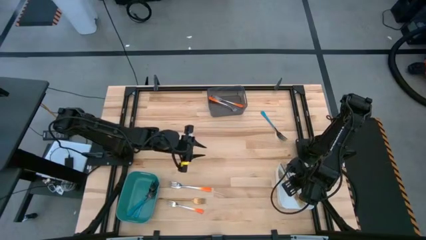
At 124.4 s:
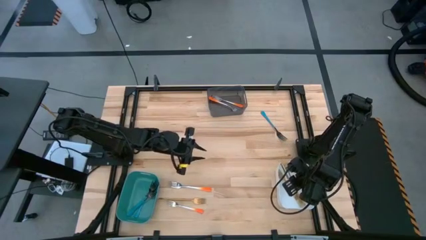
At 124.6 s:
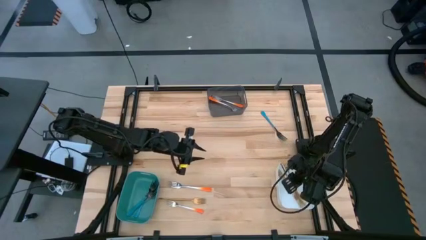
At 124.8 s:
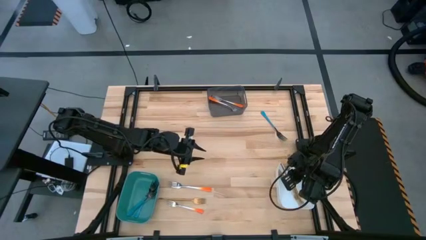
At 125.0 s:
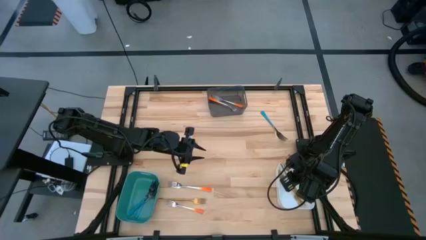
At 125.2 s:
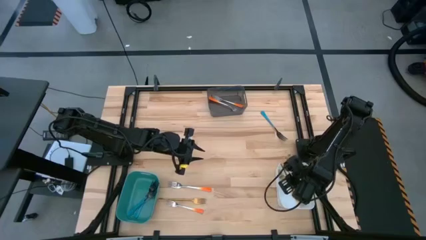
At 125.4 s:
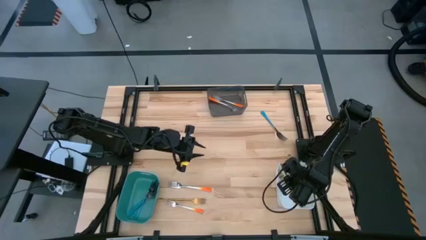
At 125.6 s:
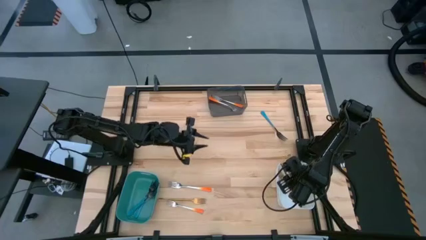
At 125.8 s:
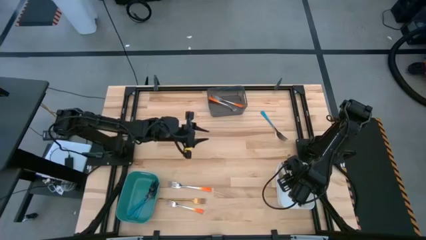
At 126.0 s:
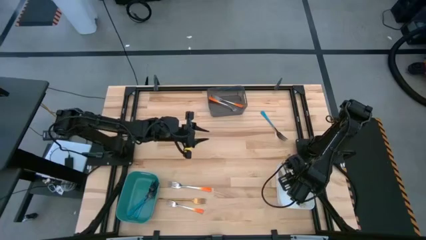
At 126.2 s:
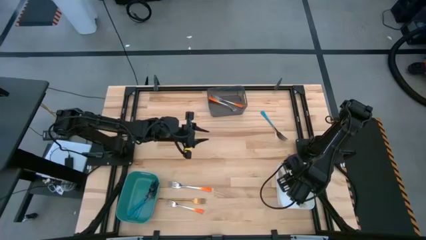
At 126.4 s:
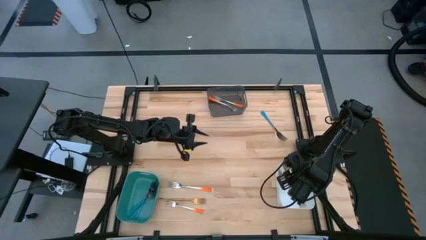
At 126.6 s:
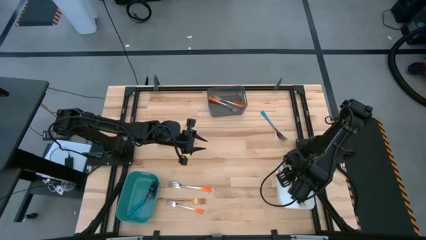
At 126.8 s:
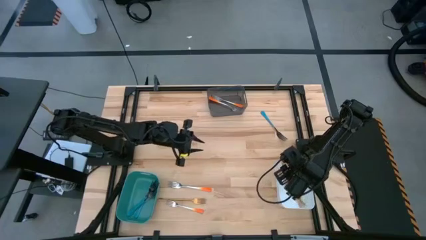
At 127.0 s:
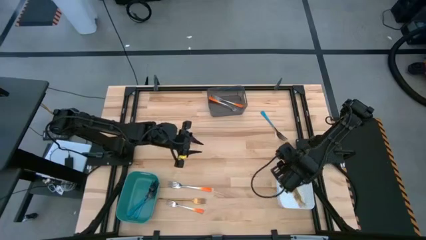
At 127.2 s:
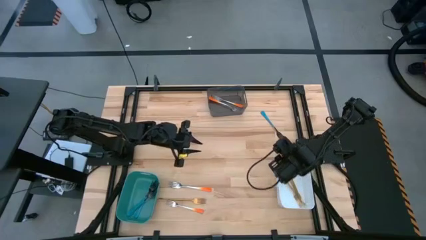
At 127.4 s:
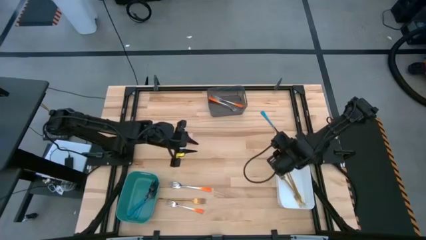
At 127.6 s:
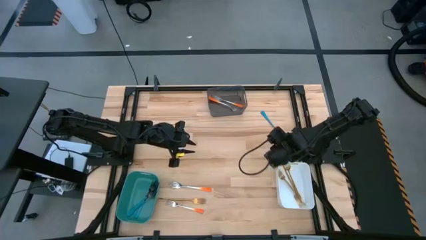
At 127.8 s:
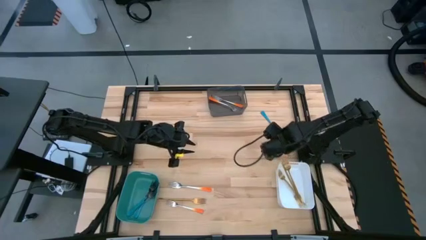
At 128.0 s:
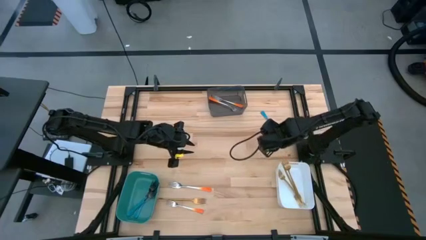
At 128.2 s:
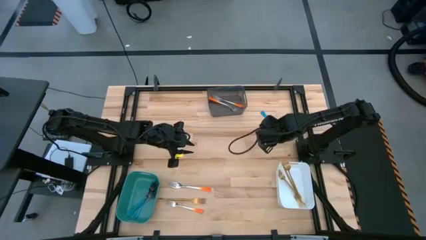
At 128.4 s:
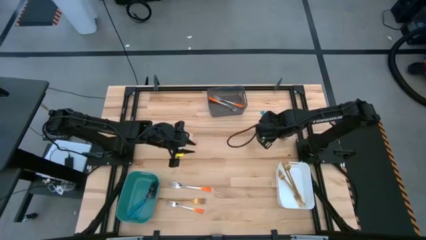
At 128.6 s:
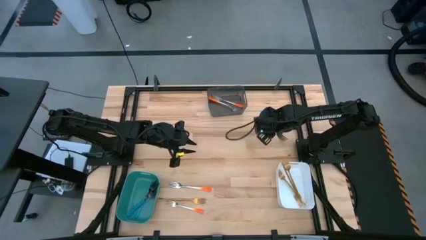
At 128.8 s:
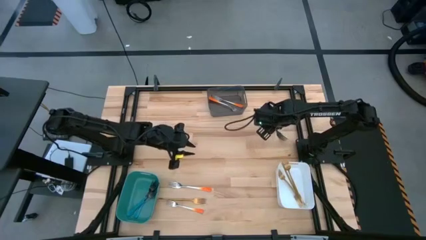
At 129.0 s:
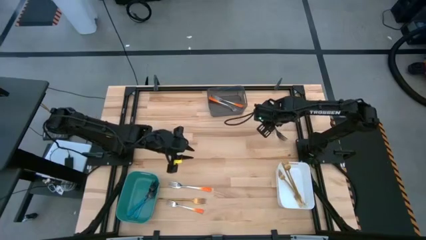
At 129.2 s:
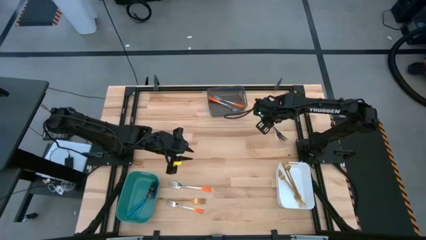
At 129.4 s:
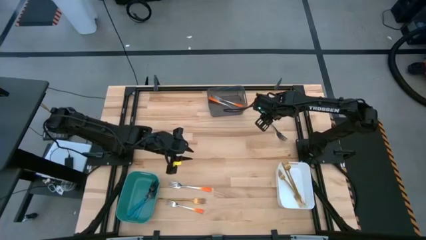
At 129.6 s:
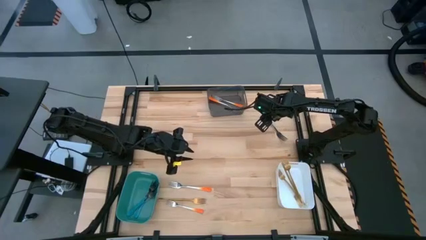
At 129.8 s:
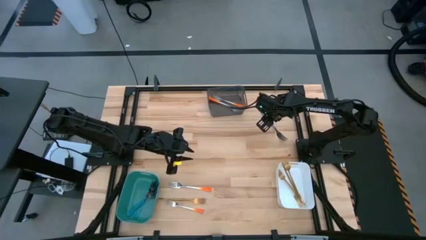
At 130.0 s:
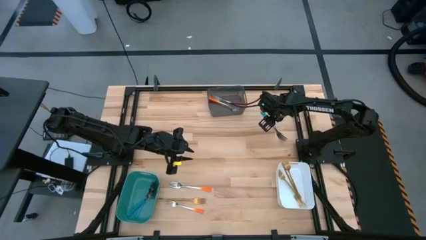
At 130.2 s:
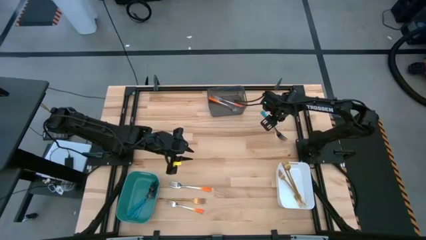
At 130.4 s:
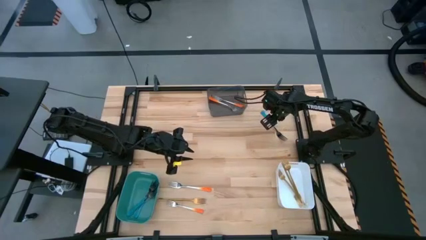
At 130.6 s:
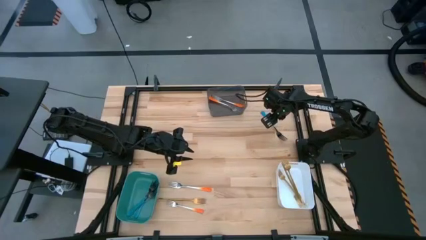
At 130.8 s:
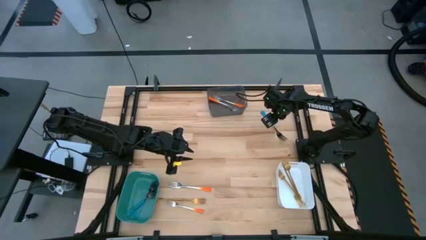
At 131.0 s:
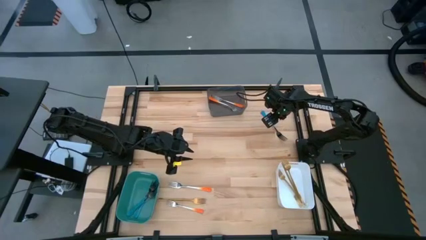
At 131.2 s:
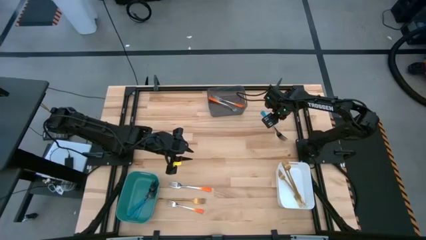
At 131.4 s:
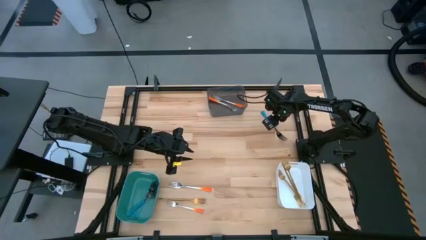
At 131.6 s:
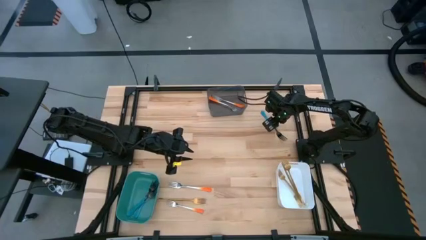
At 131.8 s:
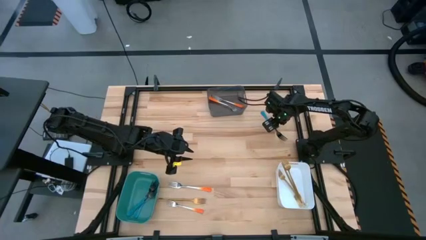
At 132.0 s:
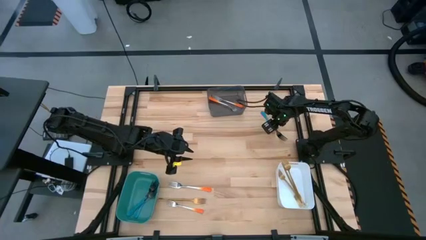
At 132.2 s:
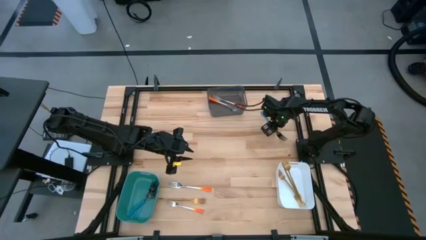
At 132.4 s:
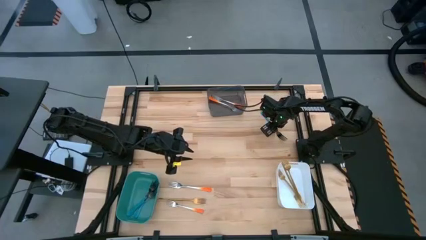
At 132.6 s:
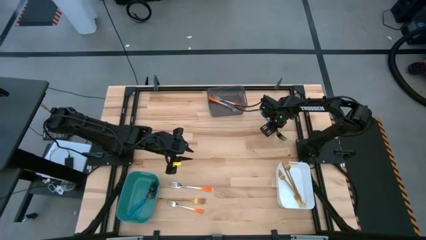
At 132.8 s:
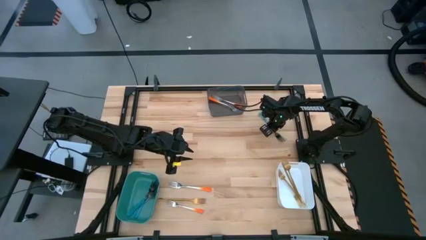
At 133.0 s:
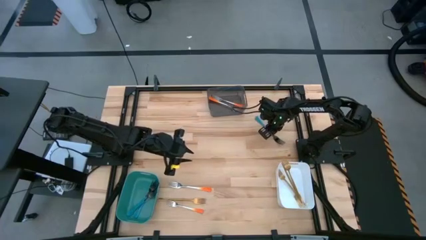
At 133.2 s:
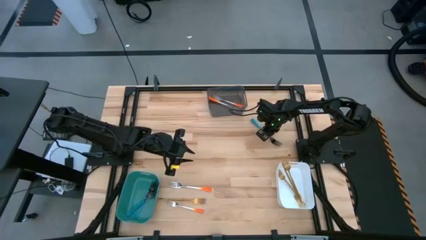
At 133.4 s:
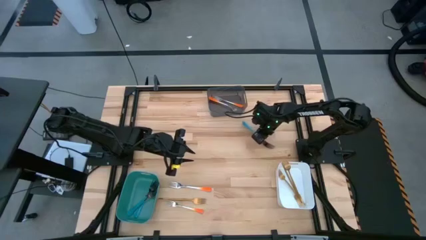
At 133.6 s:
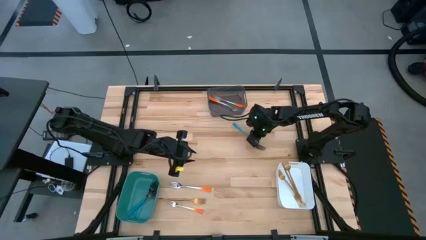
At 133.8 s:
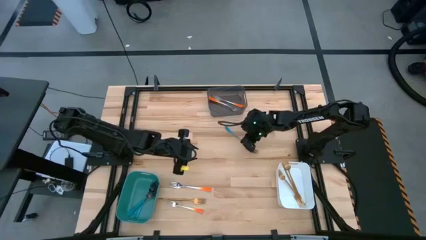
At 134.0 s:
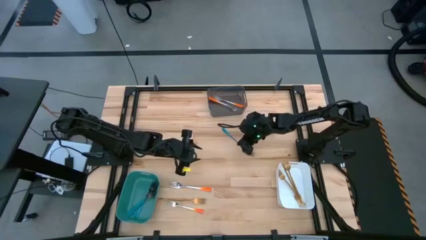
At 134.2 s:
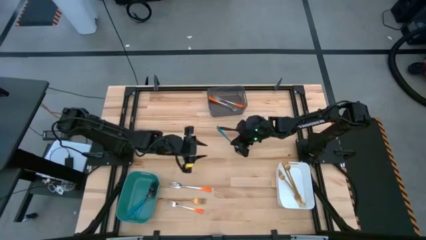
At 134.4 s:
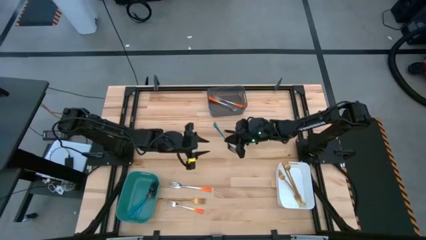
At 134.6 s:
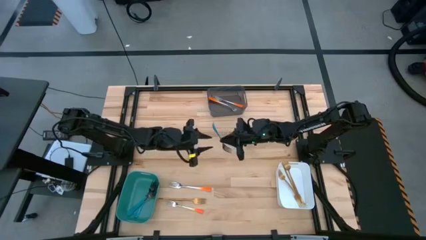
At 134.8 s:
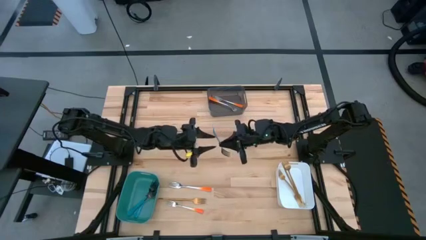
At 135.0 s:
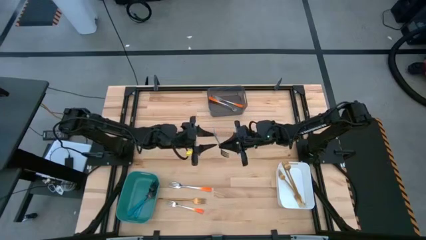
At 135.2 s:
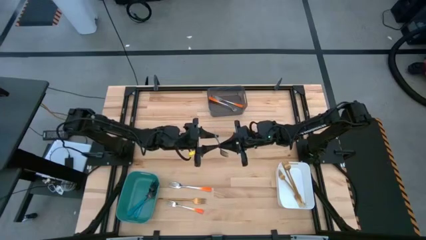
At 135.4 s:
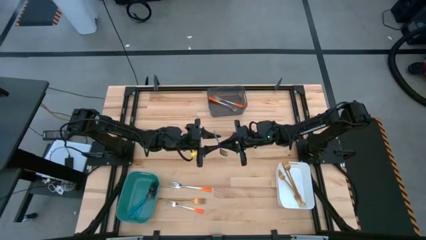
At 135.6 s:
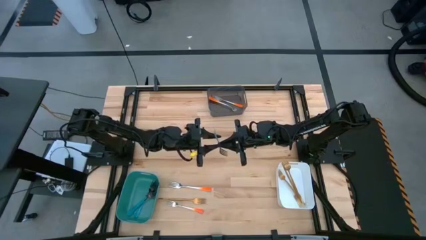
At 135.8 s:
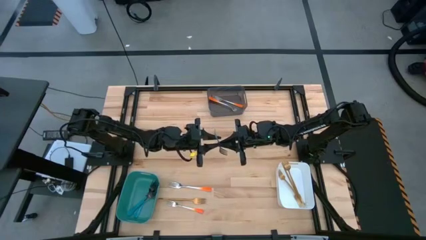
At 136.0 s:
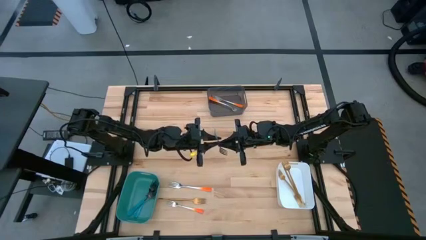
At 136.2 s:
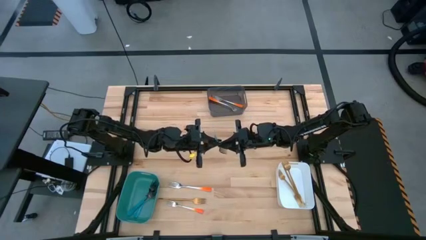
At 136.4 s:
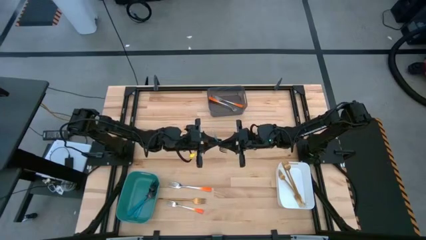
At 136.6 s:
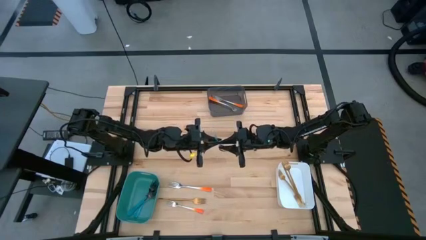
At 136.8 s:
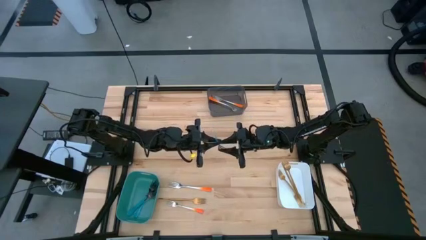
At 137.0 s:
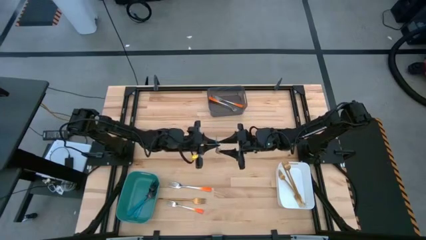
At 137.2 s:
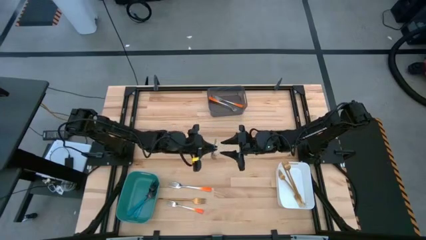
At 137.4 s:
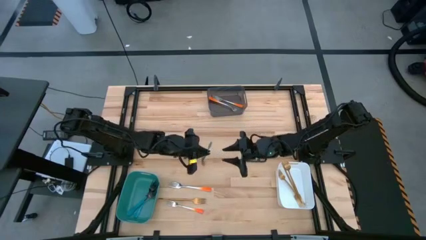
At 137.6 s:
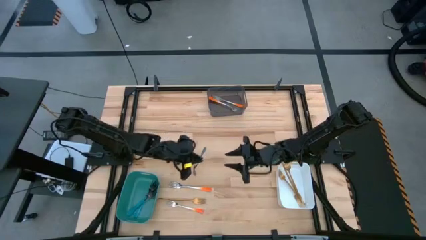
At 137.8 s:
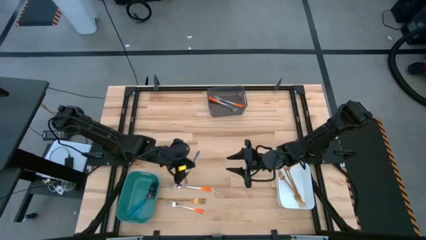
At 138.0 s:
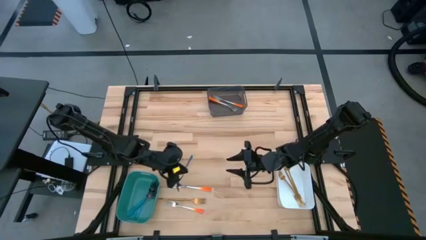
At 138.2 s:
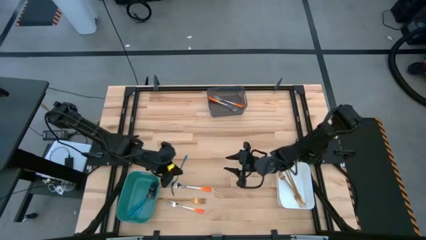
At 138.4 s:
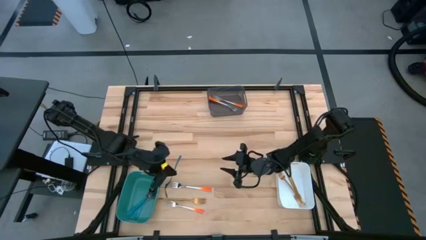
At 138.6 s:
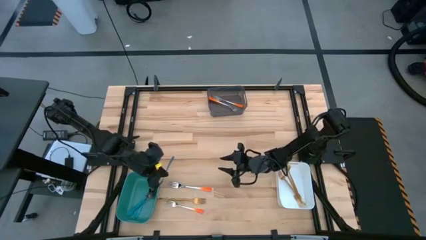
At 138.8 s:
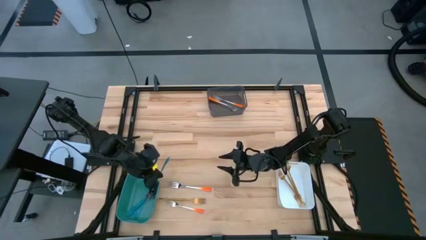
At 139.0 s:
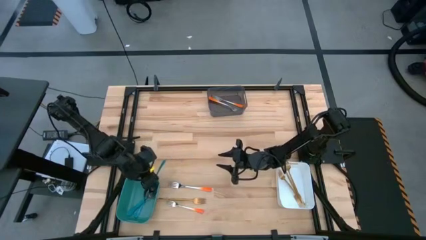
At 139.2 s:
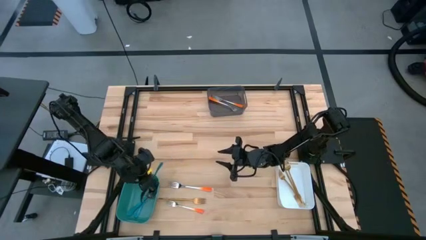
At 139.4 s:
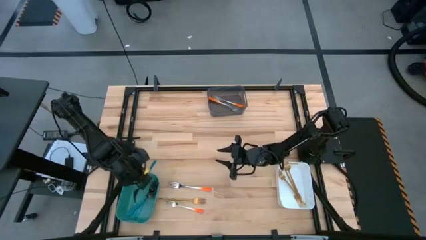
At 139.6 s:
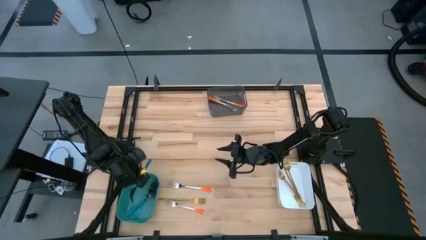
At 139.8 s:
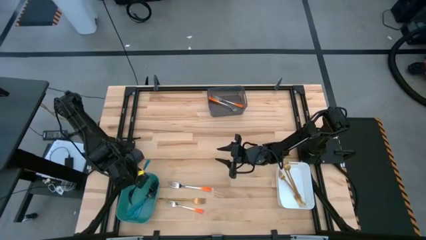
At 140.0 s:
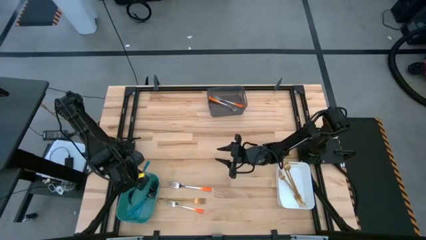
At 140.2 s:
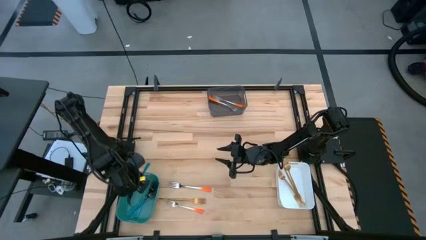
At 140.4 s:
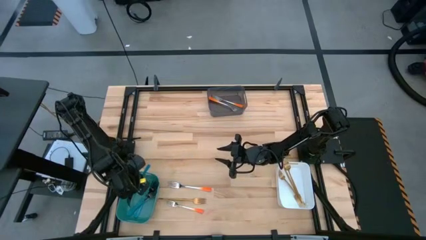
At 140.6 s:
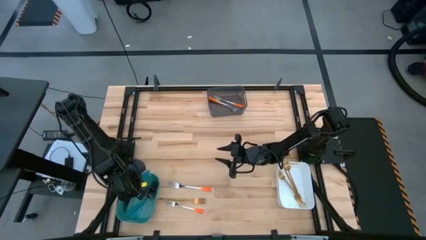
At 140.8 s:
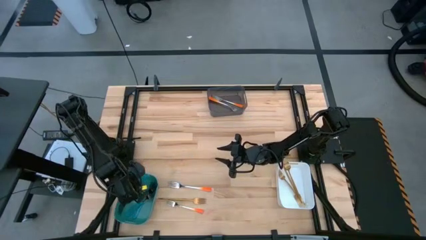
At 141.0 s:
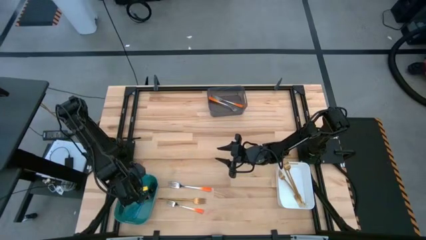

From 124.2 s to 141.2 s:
Task: Sort silverware by color (type)
Put the blue fork into the green bin
